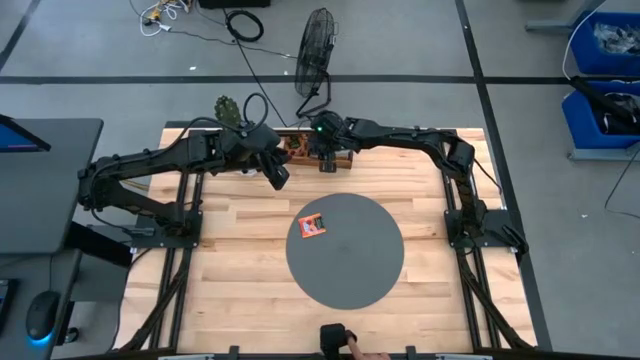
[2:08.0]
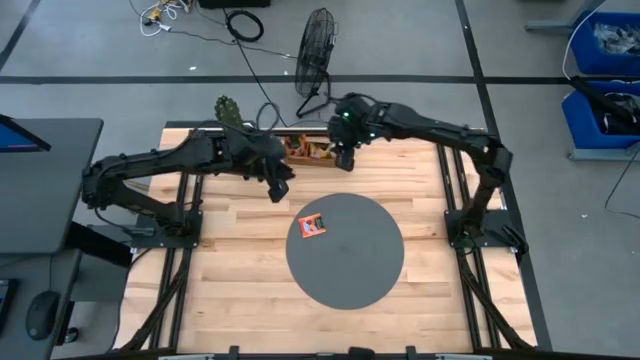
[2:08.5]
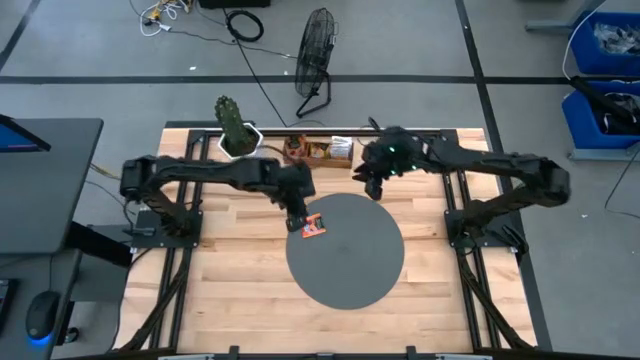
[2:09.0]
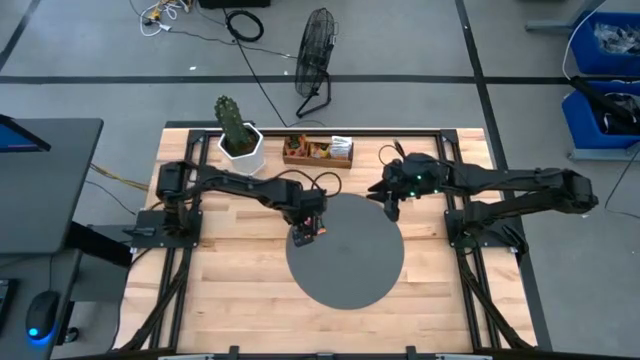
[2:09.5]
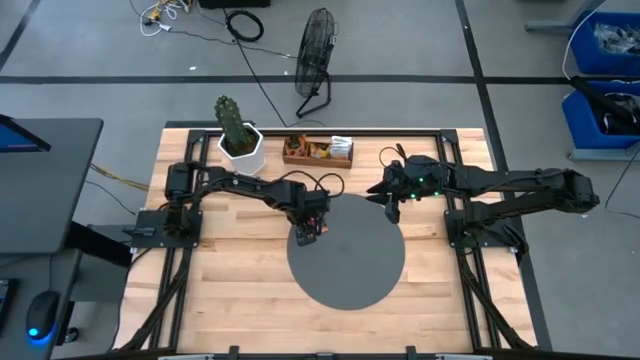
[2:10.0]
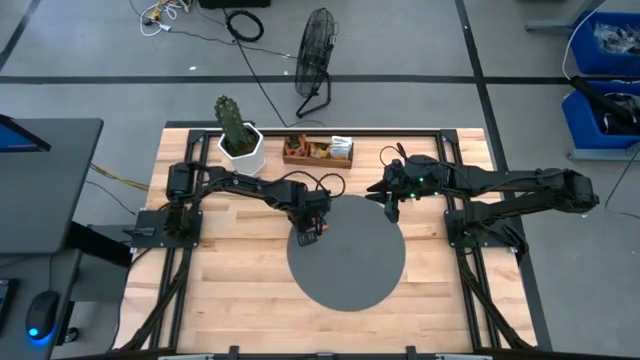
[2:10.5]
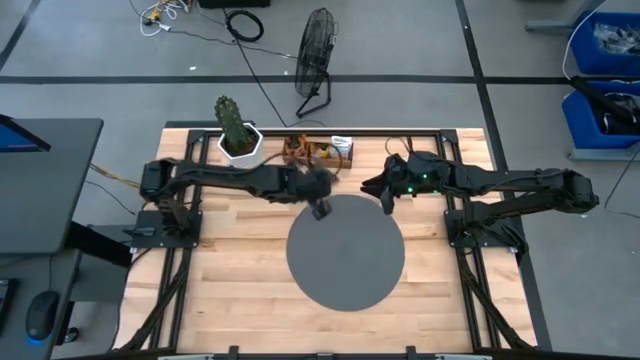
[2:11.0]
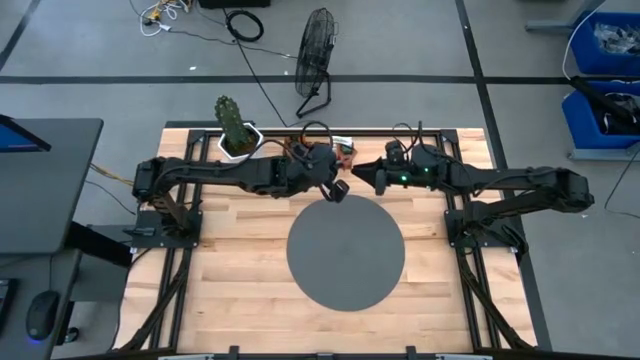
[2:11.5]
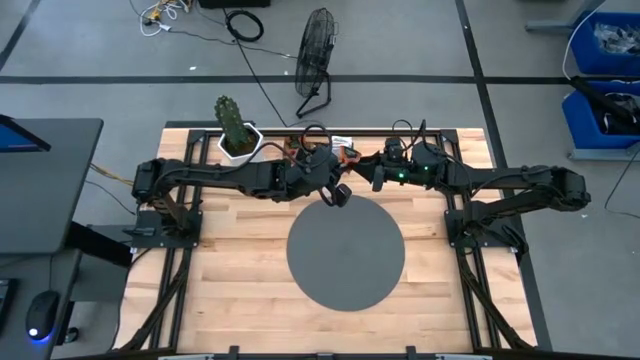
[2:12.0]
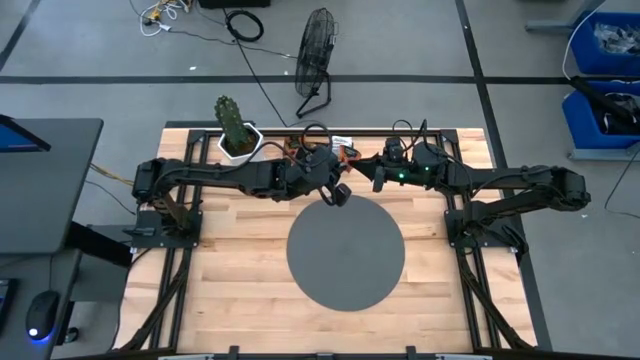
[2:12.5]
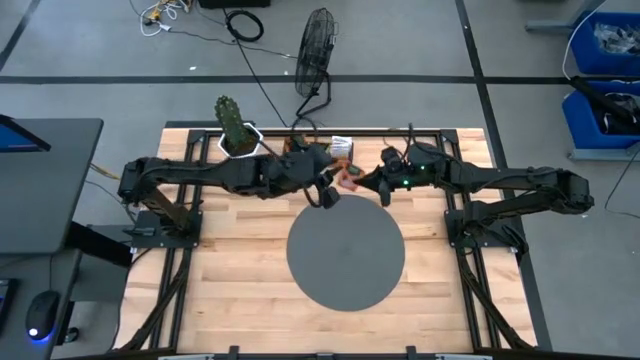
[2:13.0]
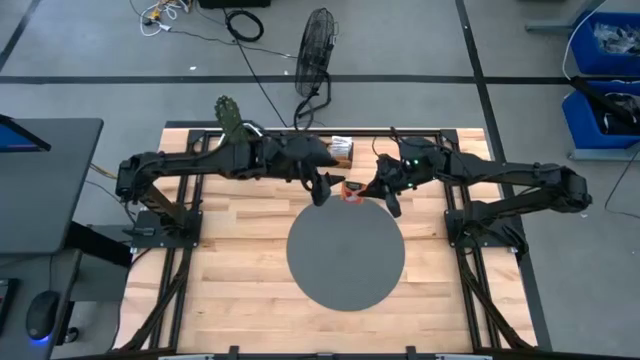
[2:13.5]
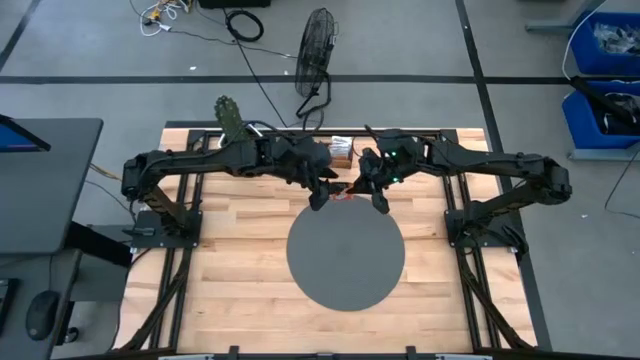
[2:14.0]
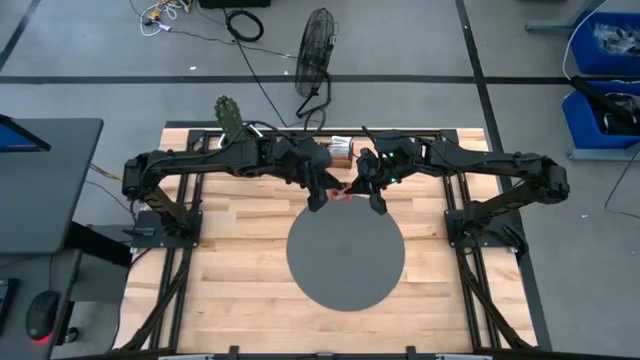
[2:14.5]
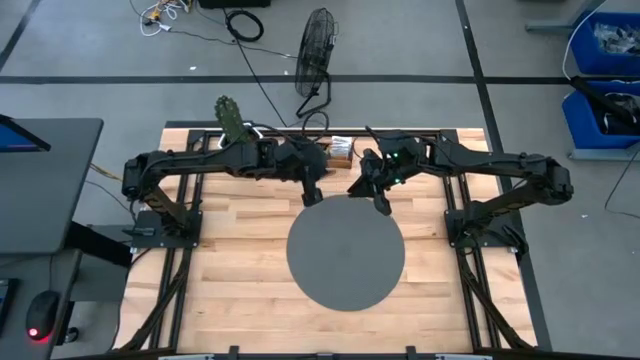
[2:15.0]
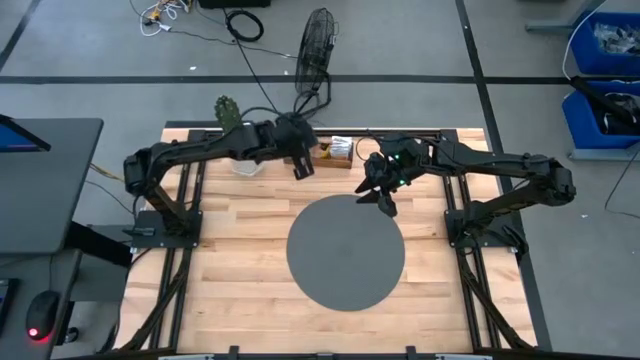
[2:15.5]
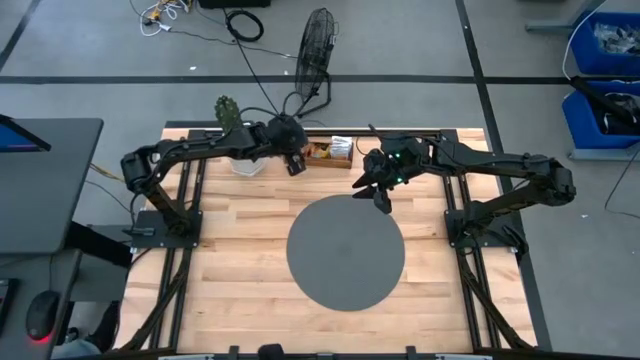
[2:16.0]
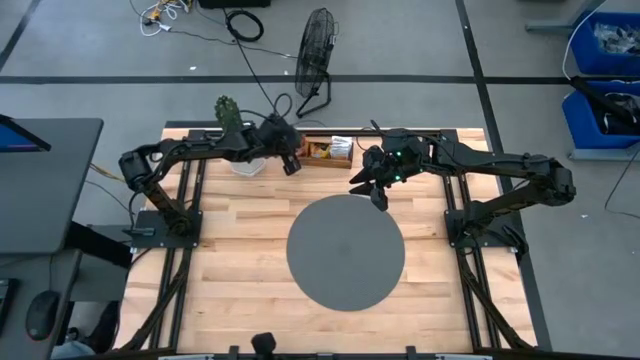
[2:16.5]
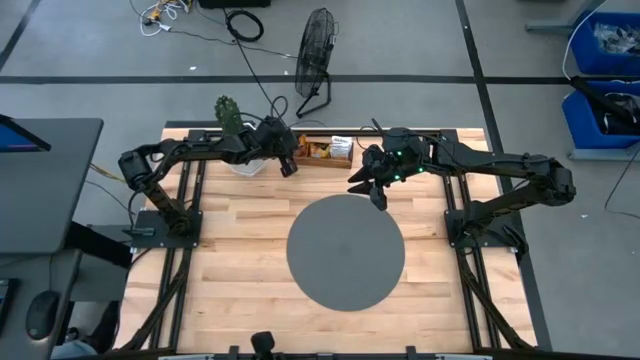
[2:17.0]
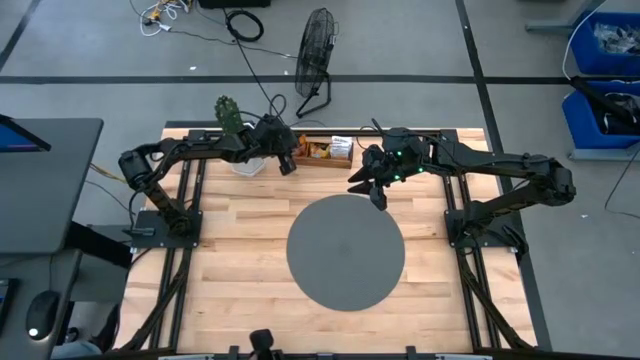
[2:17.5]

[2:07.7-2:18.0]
Task: Pick & Place Tea
Put the orange tea bag into the left section of the wooden organizer

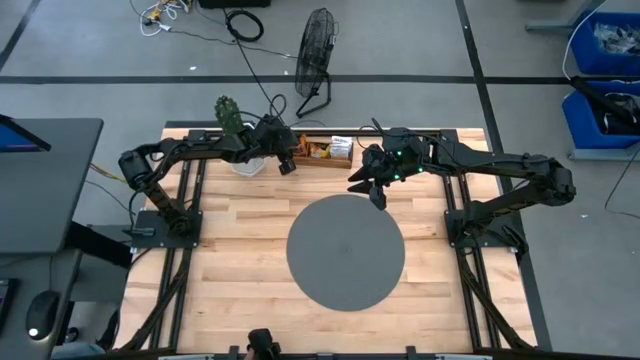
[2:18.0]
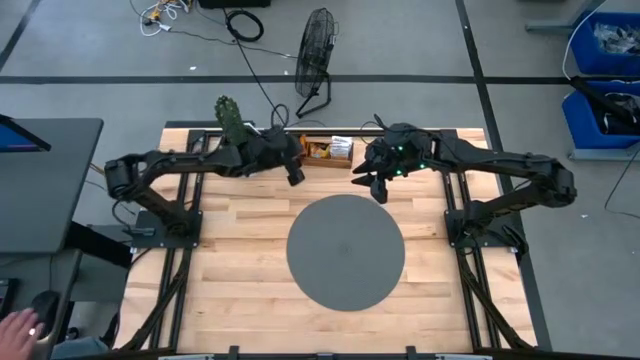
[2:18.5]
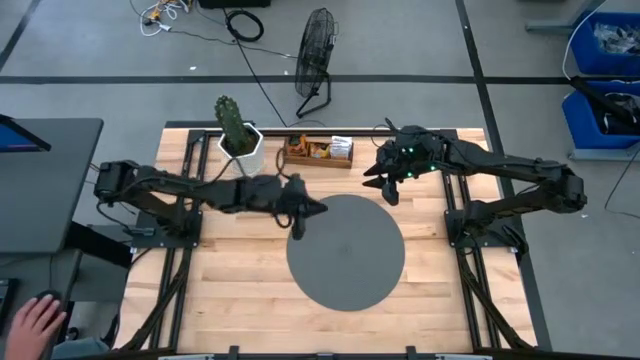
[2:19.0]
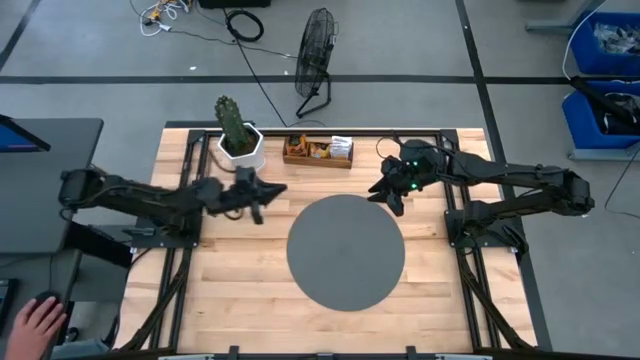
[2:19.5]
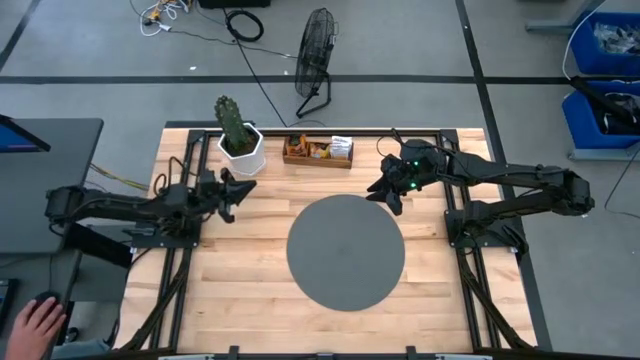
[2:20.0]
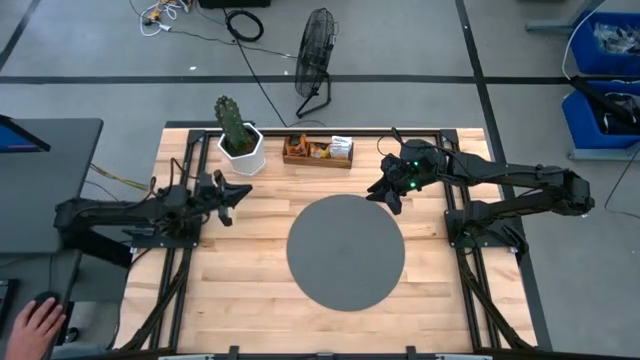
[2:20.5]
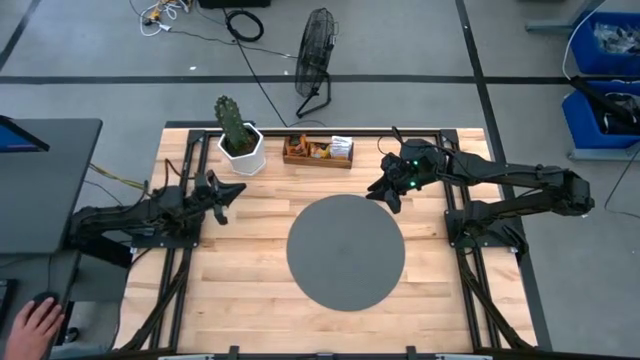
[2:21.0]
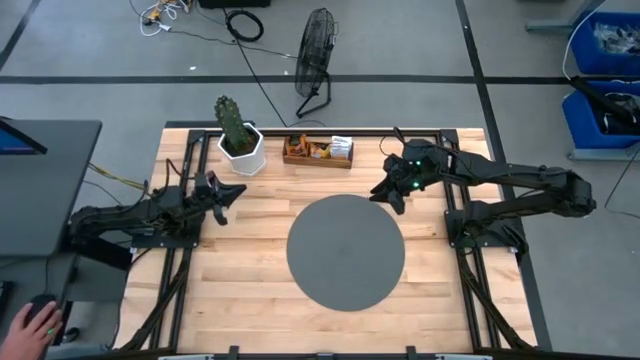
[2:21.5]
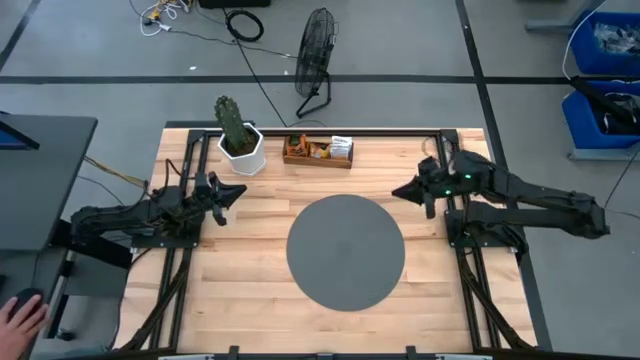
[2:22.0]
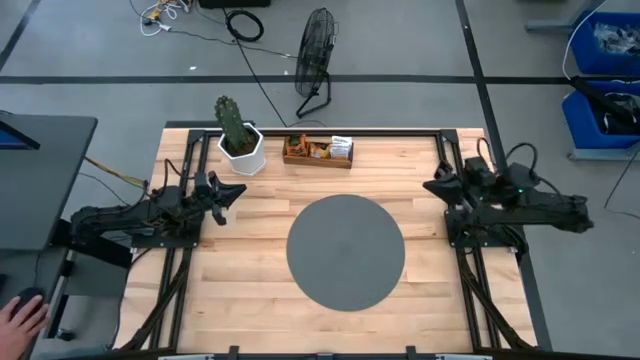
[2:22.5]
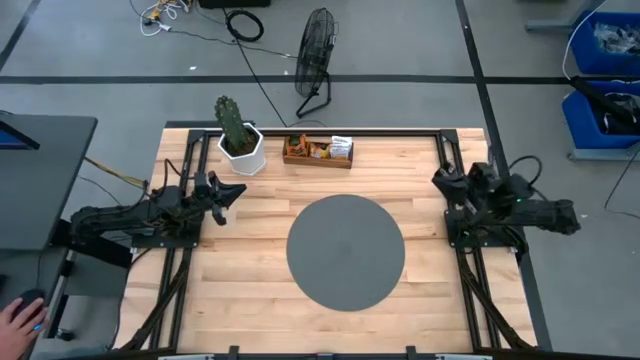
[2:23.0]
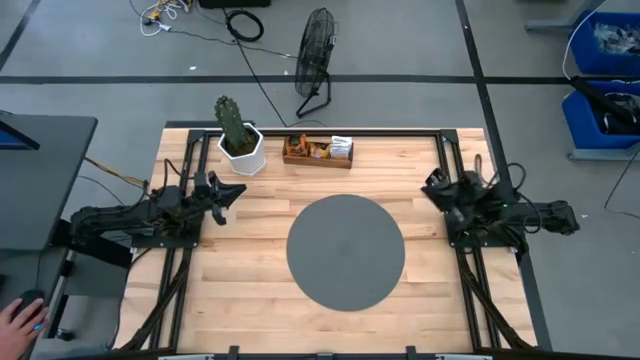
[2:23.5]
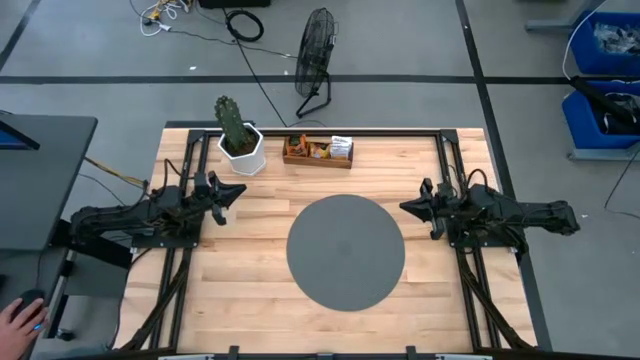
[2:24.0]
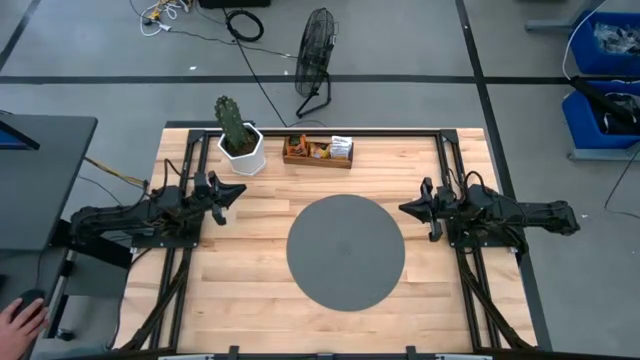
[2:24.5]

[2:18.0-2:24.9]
Return to Home Position

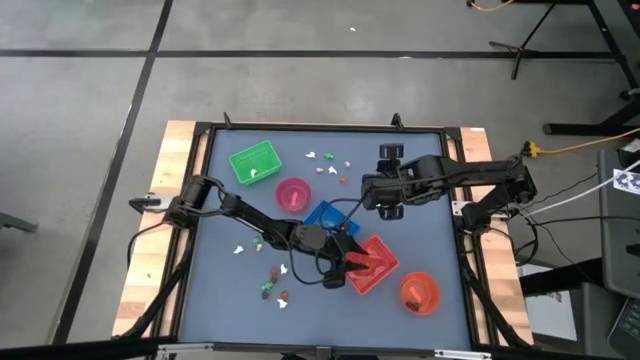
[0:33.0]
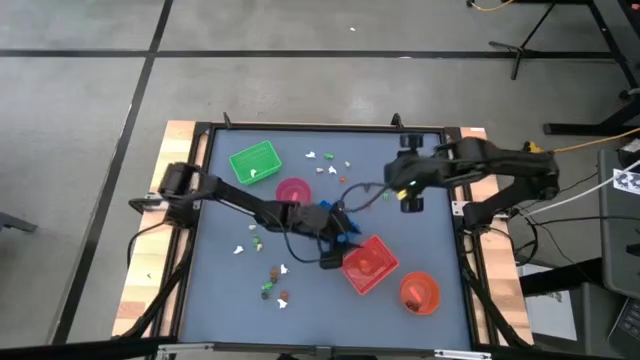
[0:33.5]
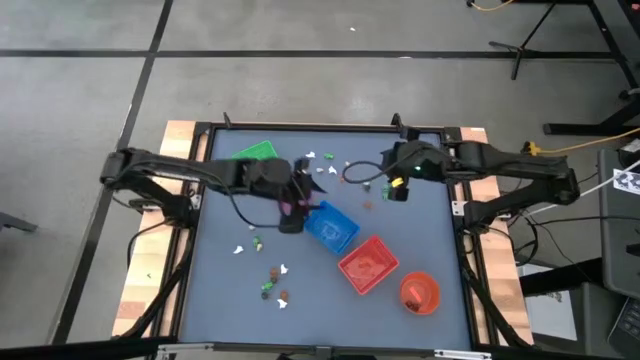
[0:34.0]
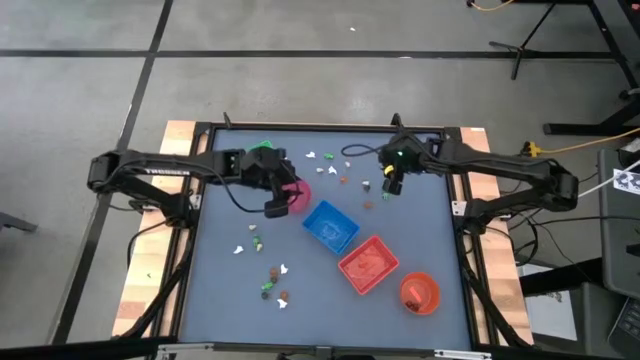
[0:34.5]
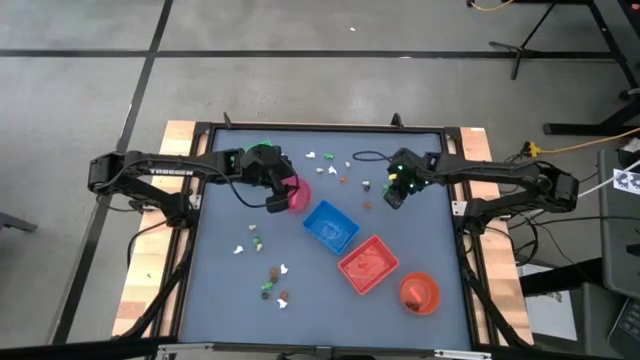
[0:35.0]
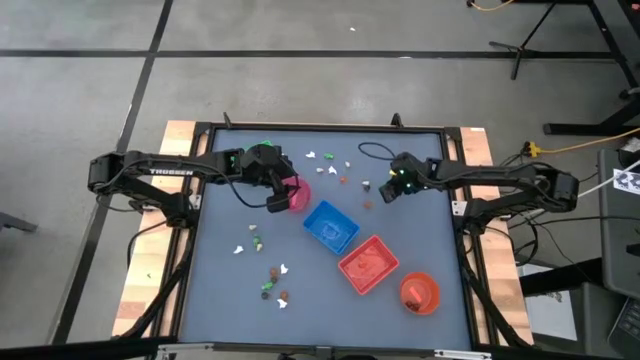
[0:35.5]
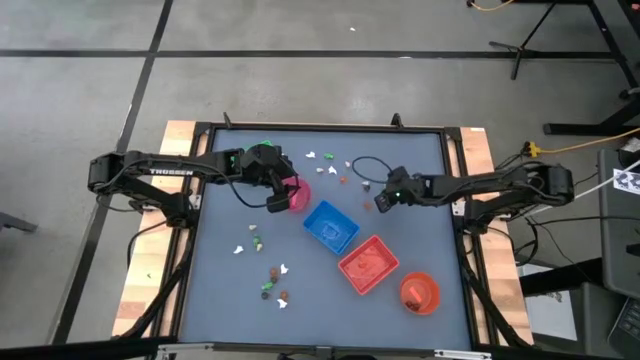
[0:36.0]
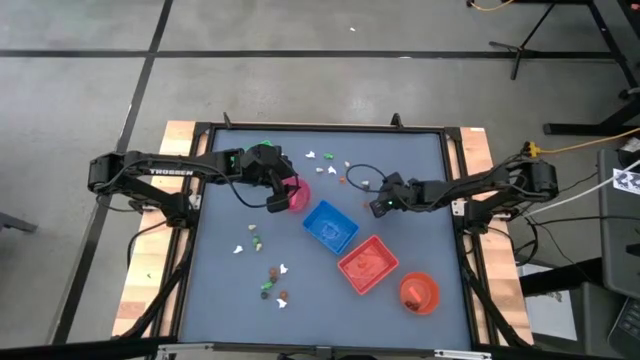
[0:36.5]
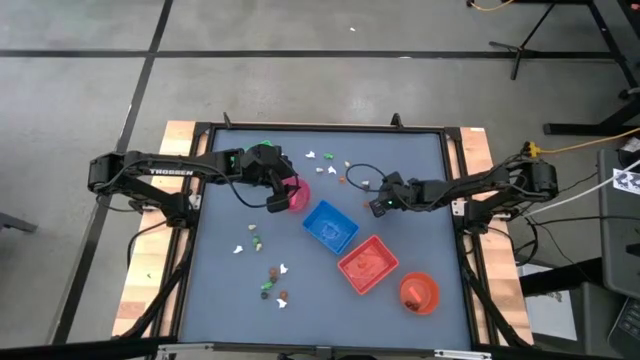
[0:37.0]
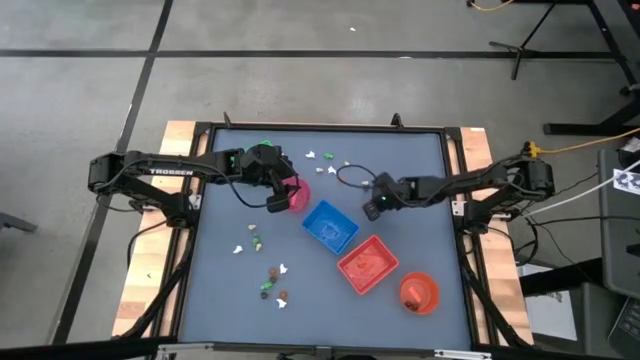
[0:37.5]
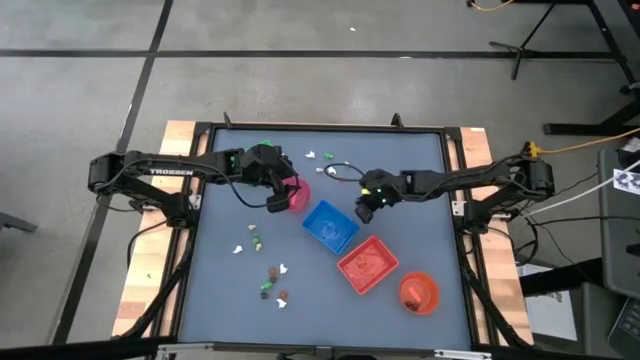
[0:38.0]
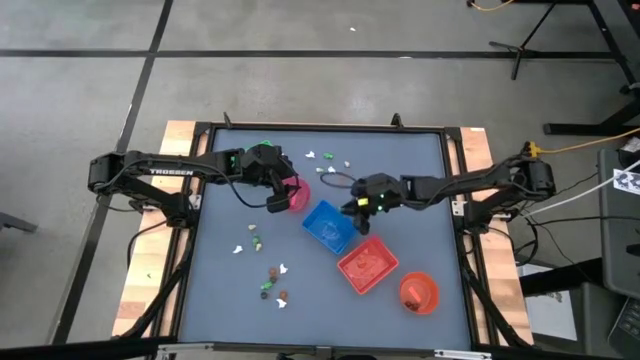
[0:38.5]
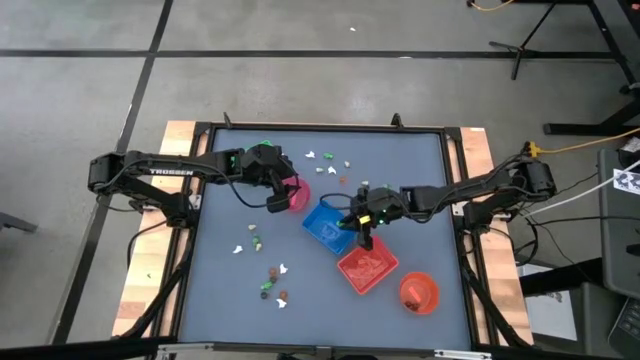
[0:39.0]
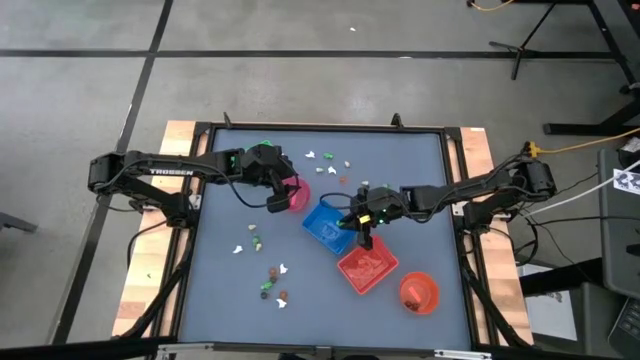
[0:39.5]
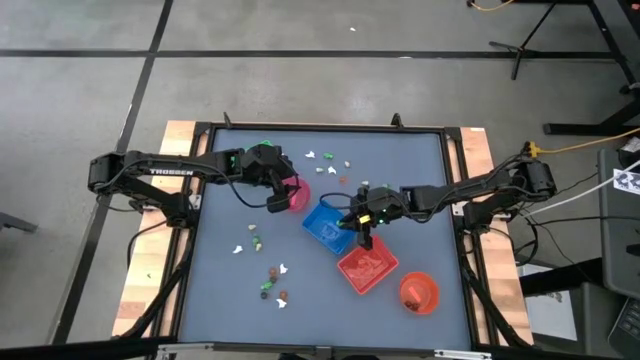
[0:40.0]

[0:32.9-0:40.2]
Task: Sort Halloween decoration
Put the green skeleton toy into the blue bin
